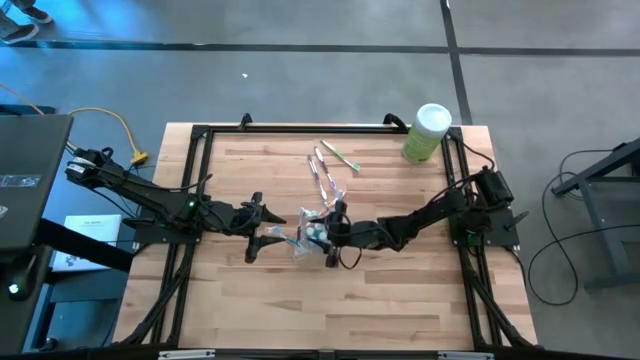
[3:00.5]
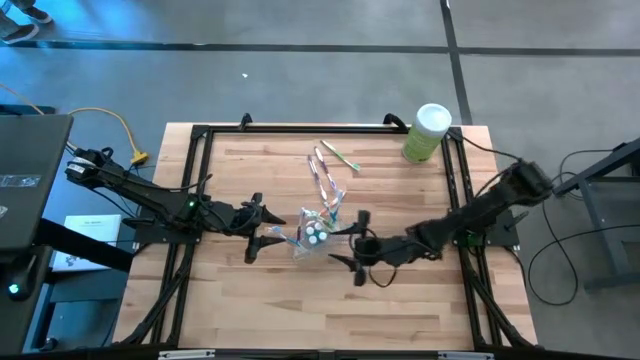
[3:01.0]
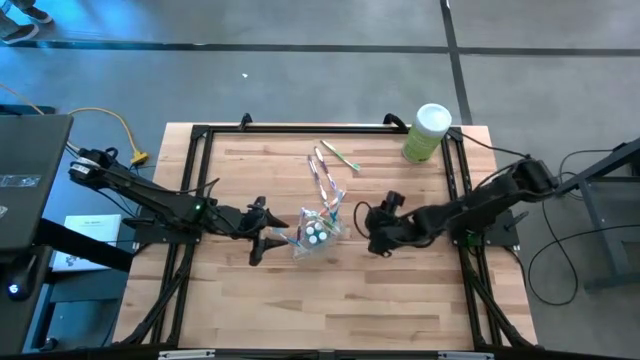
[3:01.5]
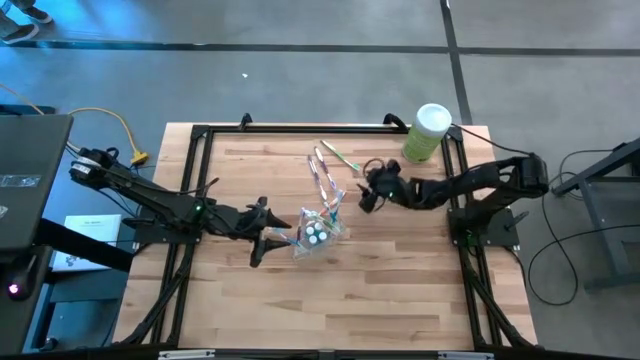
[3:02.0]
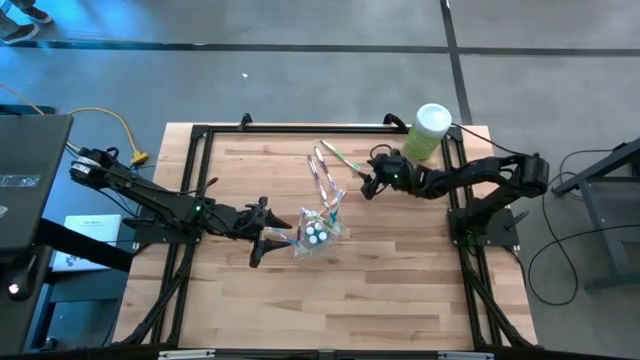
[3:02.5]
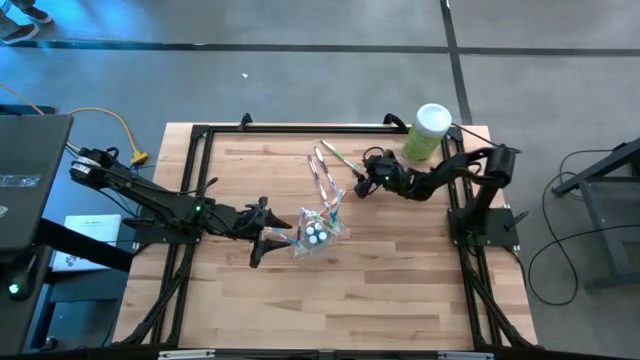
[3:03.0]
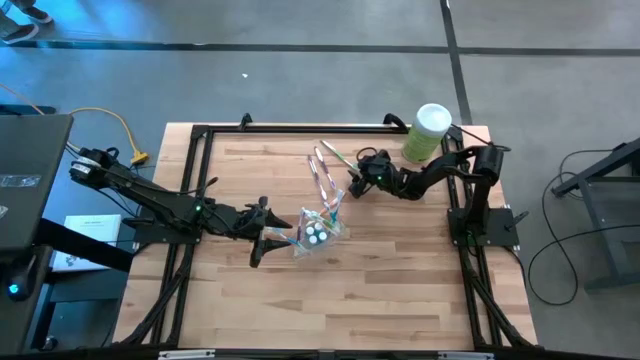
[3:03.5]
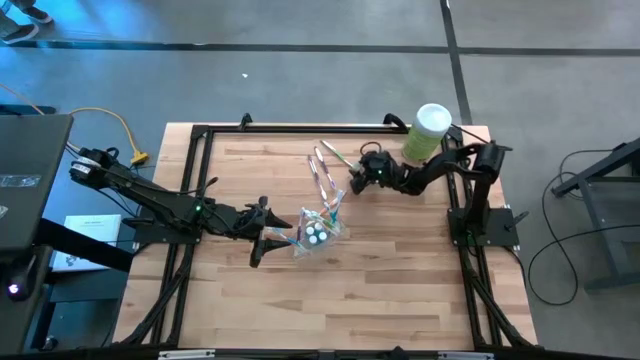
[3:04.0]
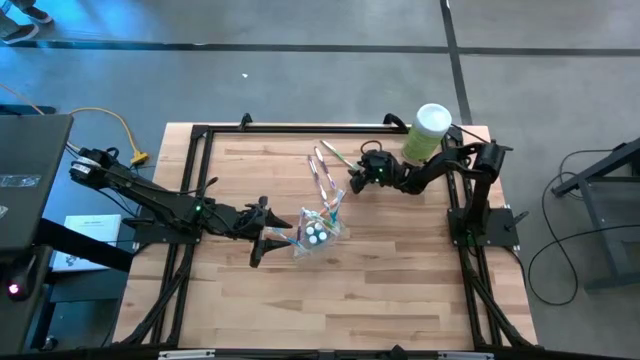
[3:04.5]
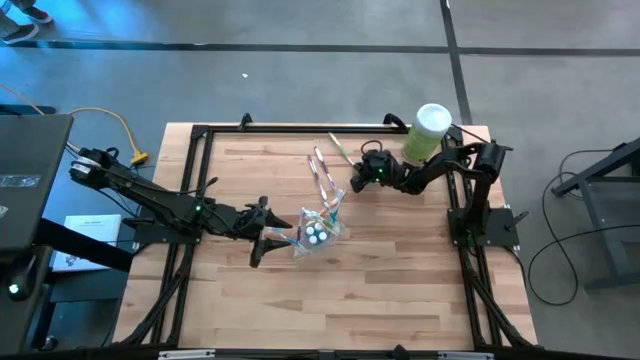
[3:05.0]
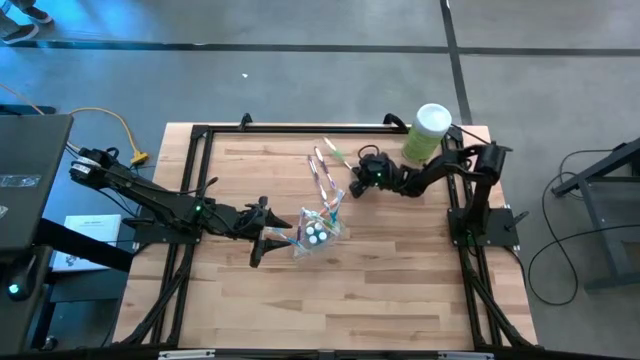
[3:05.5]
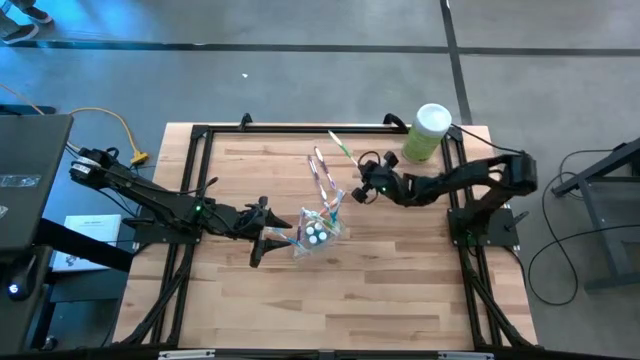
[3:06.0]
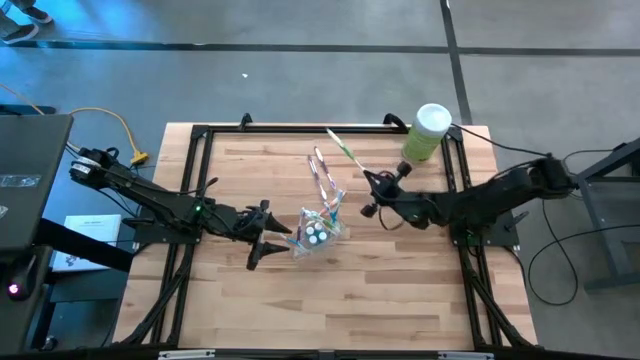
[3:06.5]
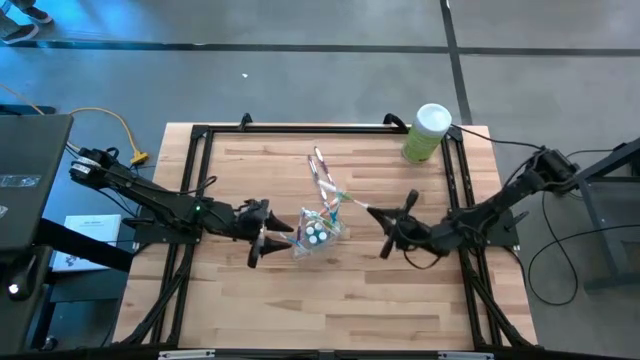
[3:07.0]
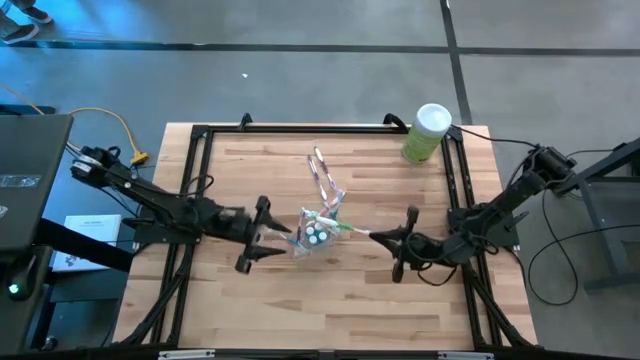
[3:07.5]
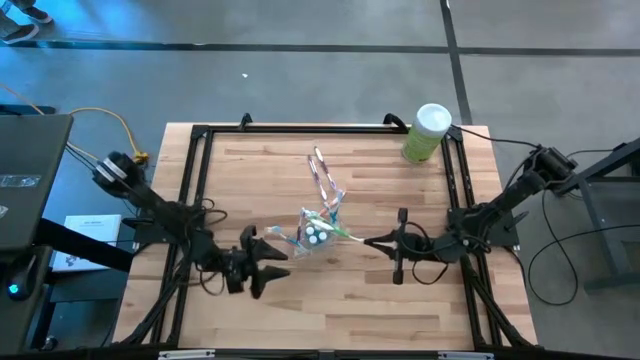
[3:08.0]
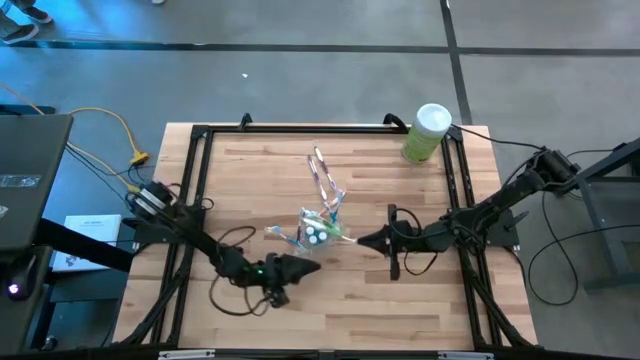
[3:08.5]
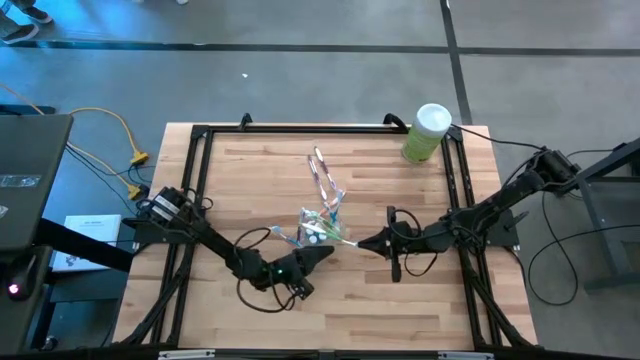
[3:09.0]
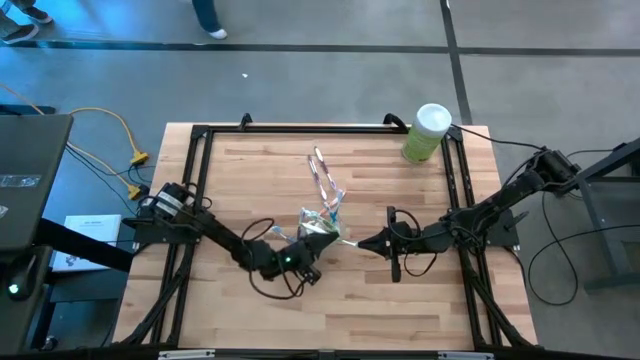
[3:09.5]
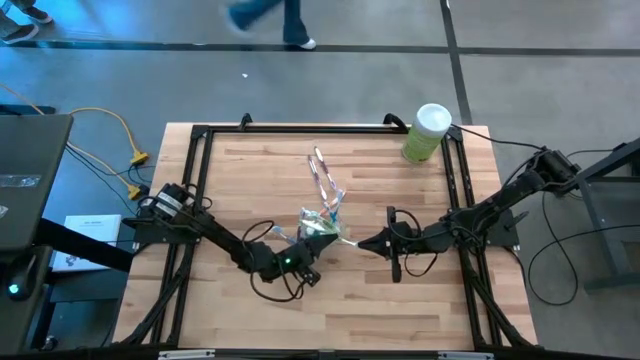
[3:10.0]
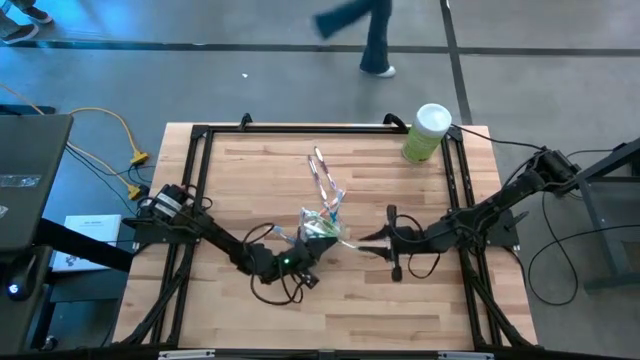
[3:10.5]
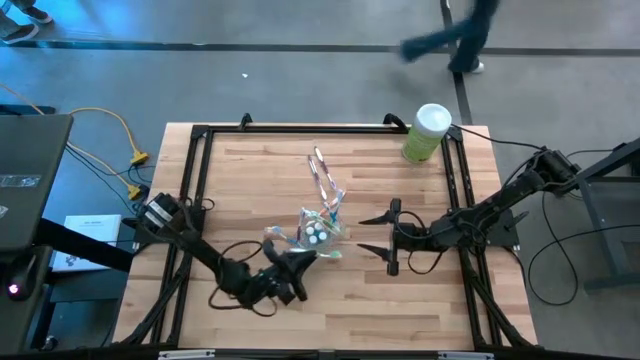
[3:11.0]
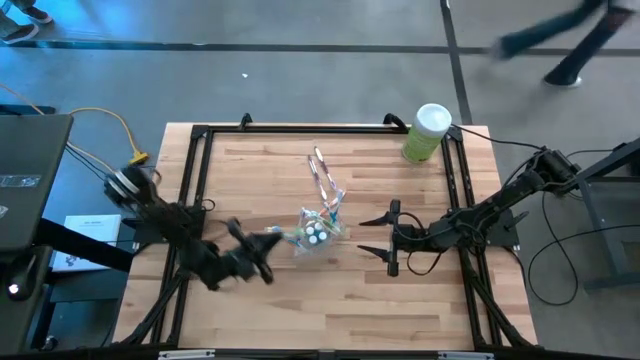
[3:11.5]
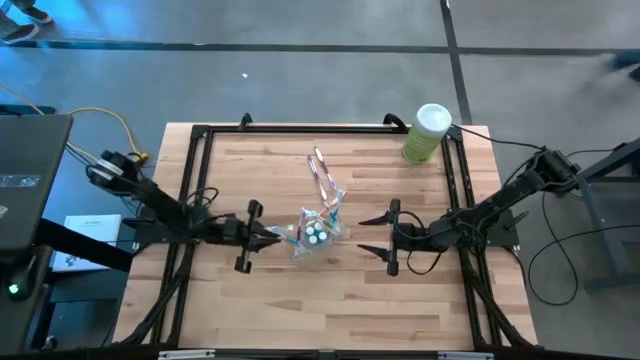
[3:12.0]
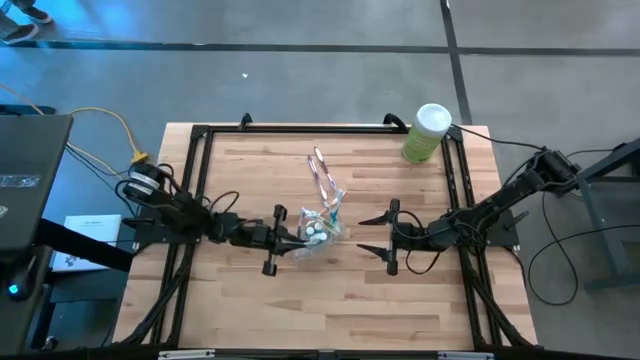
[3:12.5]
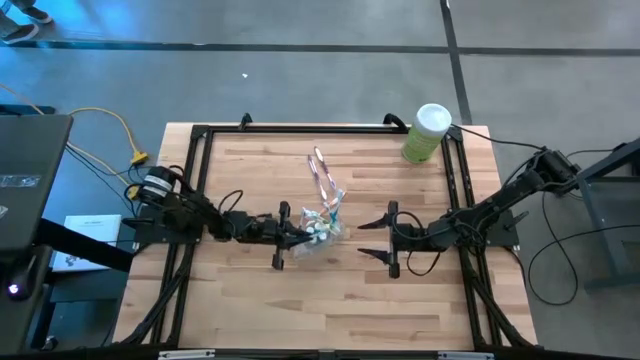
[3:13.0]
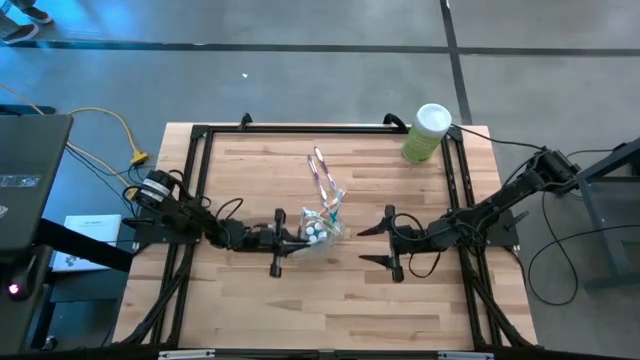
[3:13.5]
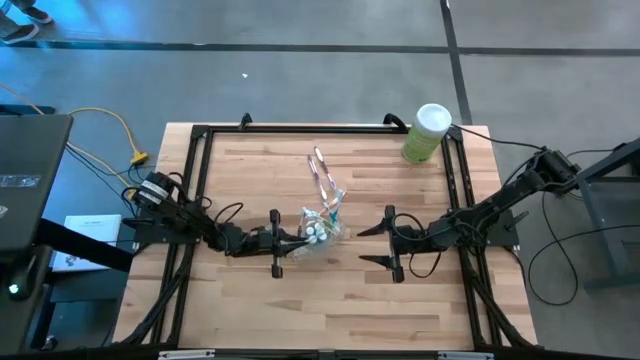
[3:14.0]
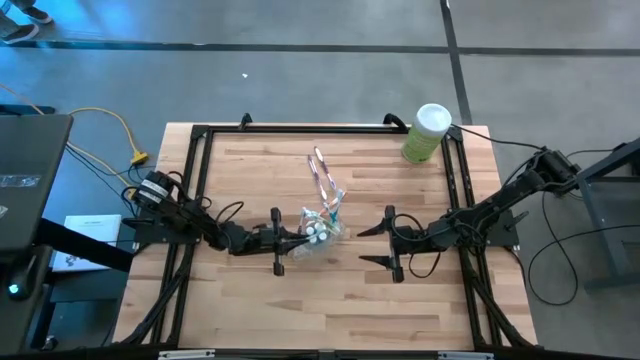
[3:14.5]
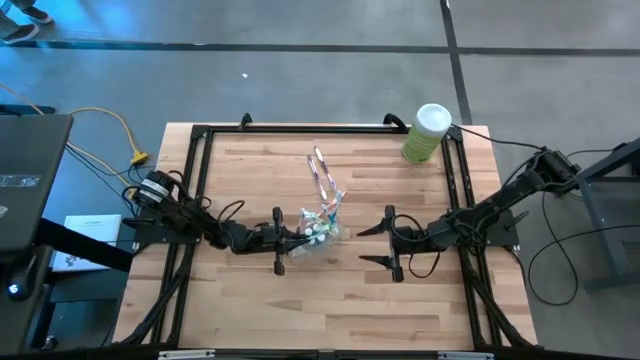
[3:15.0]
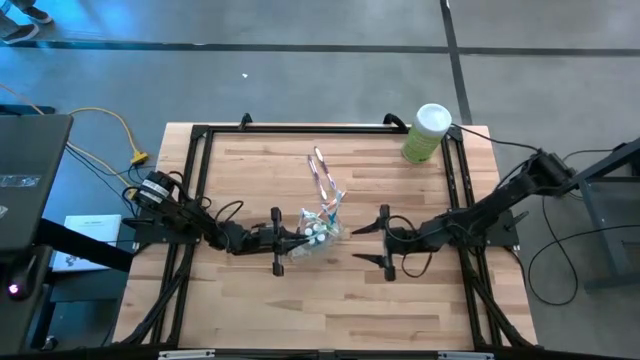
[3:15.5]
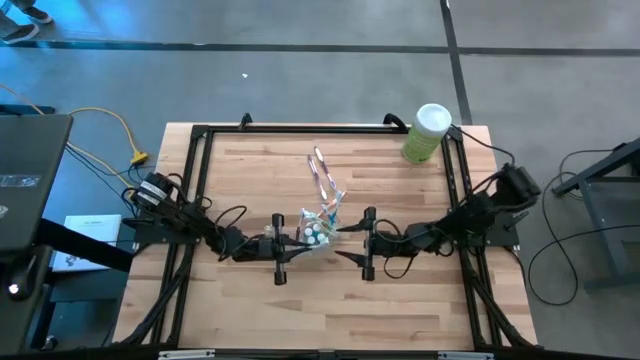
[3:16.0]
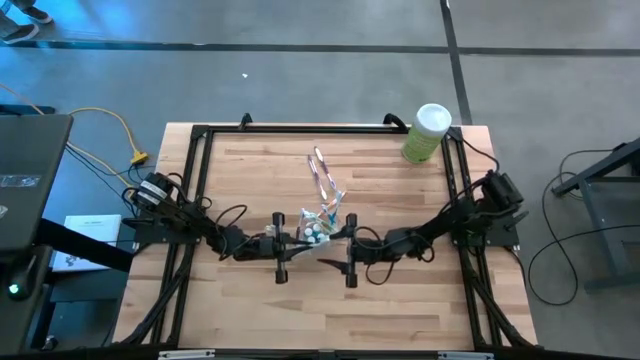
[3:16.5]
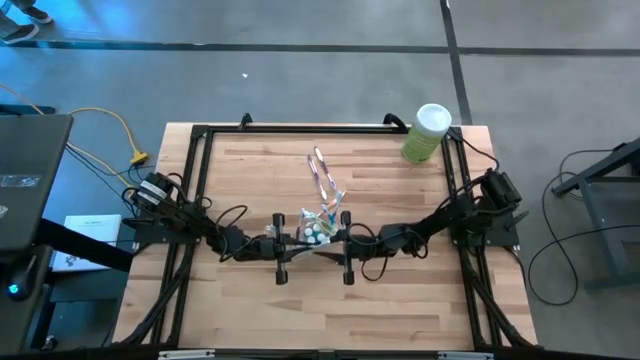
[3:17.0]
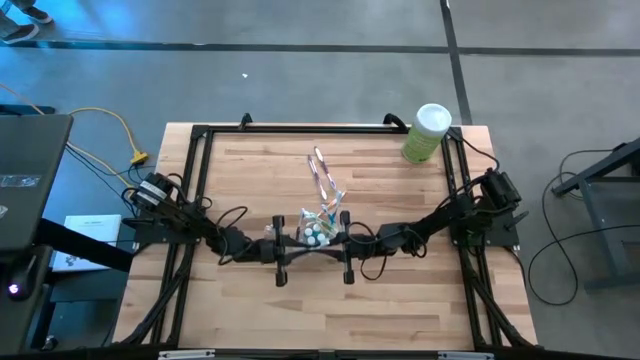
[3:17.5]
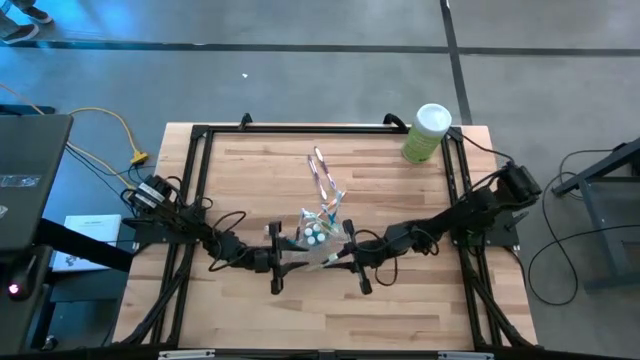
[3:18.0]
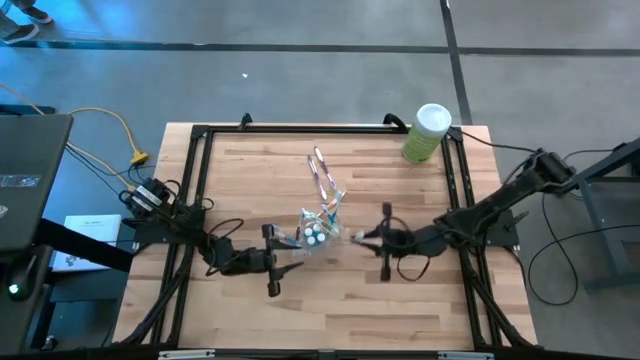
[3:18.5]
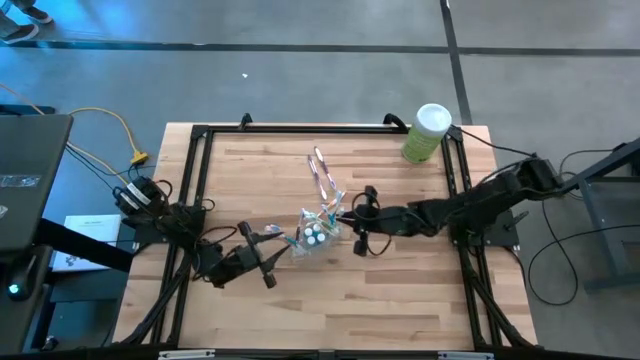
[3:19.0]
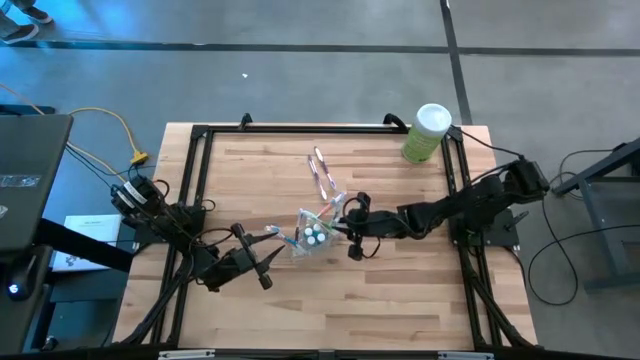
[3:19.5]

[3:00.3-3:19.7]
Task: Pick & Place toothbrushing station
Put the green toothbrush into the transparent organizer

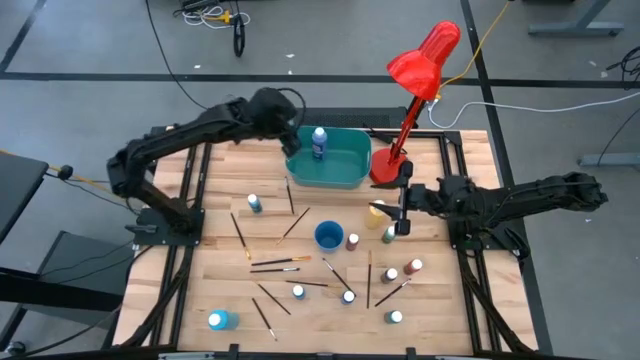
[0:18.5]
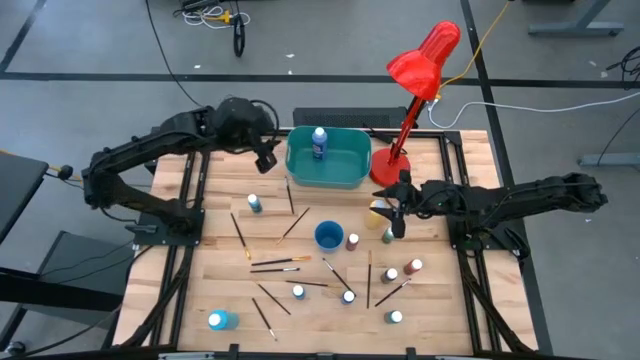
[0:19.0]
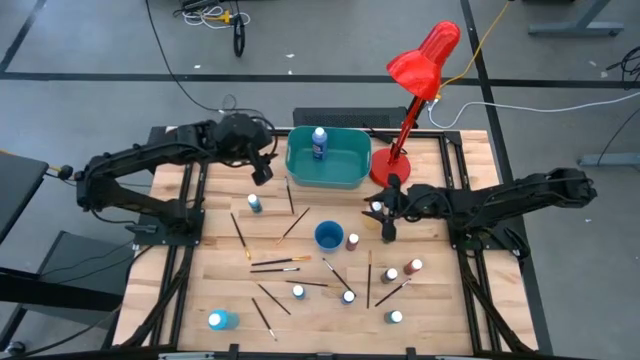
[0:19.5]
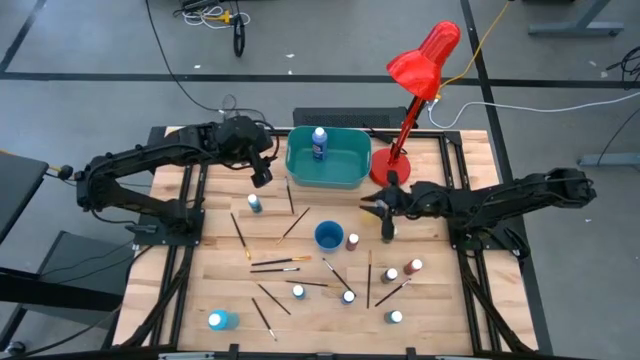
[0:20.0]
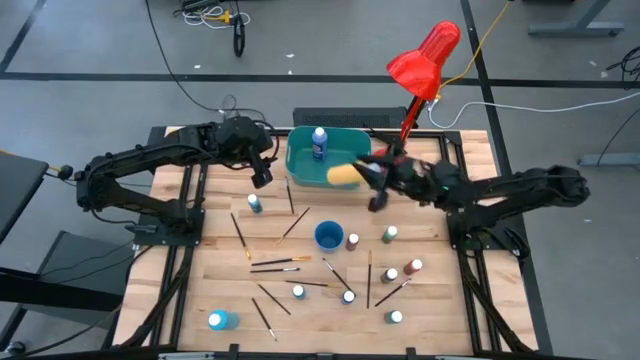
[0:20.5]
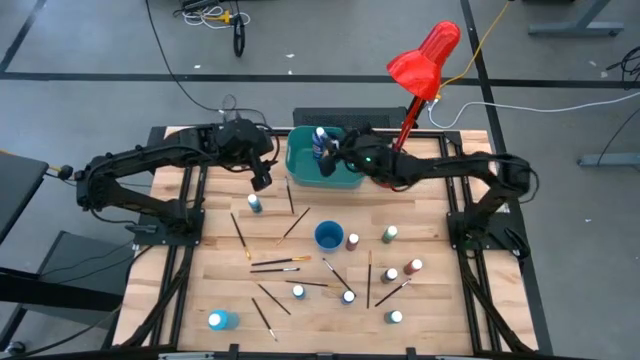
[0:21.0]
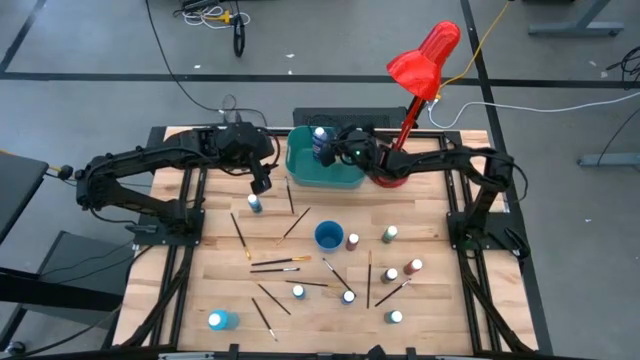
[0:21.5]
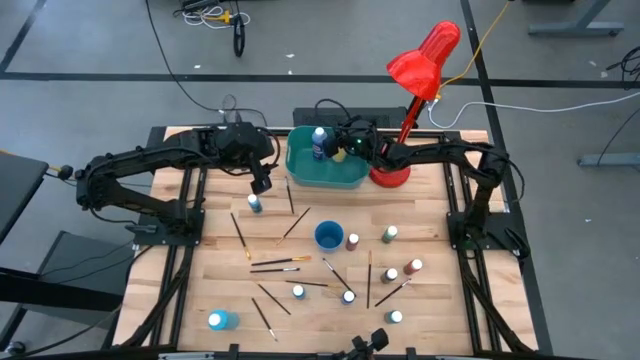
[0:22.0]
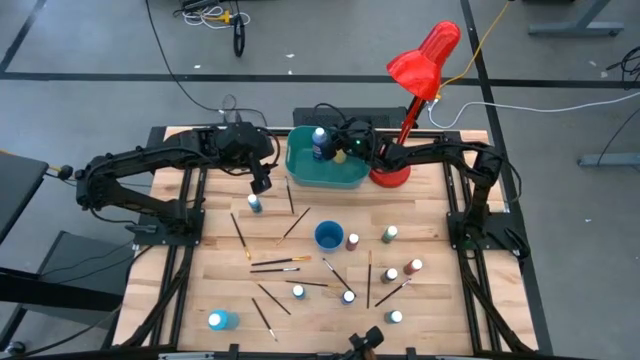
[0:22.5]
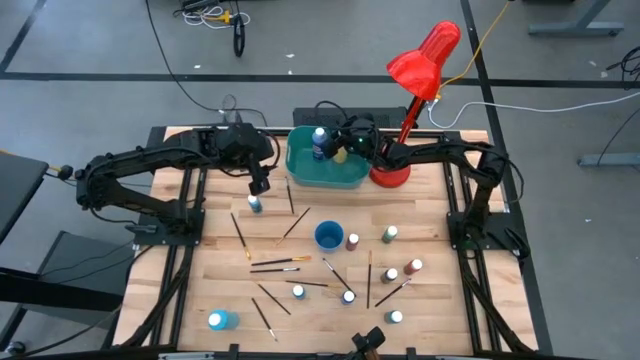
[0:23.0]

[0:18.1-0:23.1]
Task: Pick & Place Paint Supplies
Put the yellow paint bottle into the green bin
